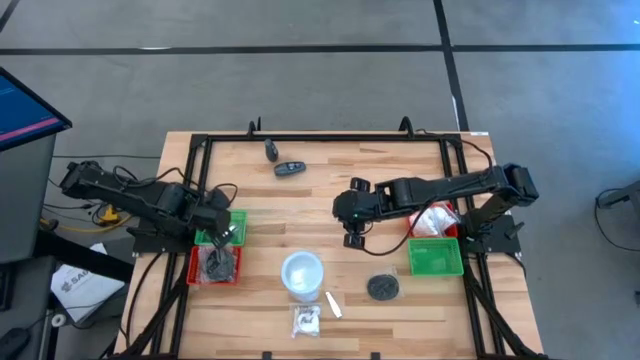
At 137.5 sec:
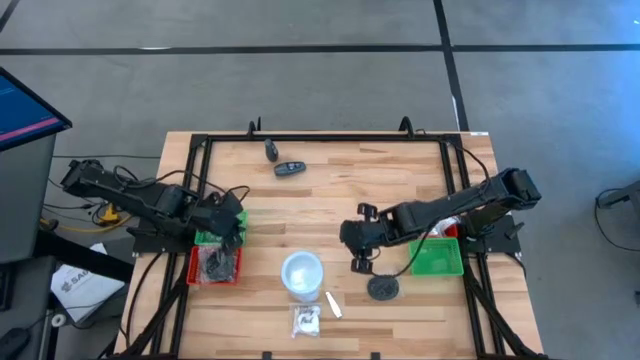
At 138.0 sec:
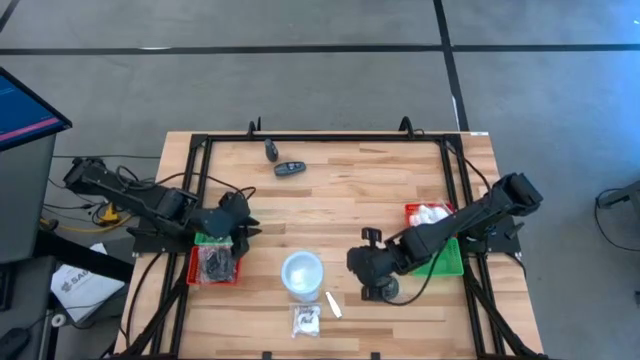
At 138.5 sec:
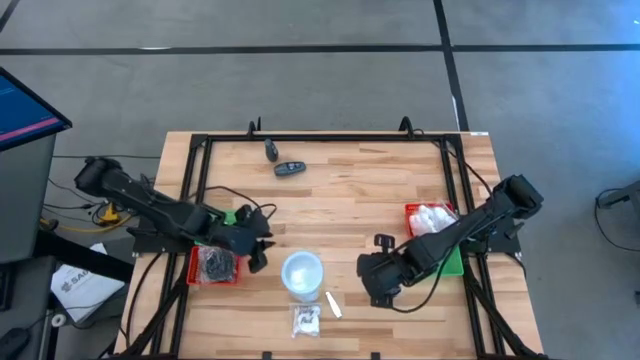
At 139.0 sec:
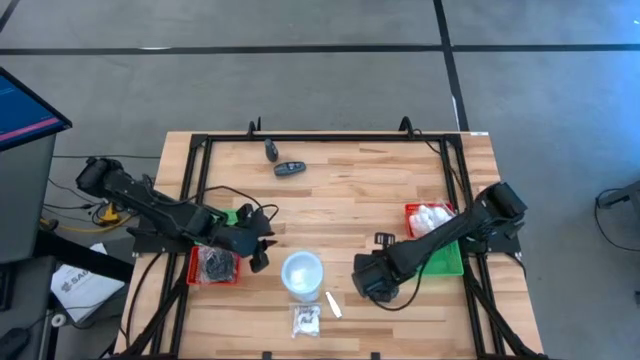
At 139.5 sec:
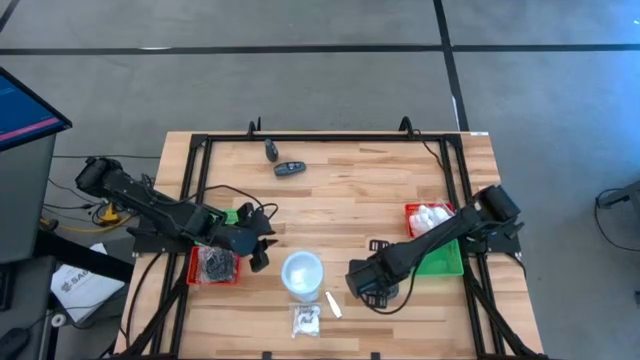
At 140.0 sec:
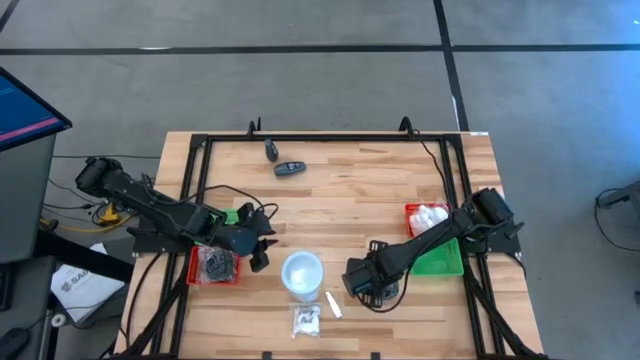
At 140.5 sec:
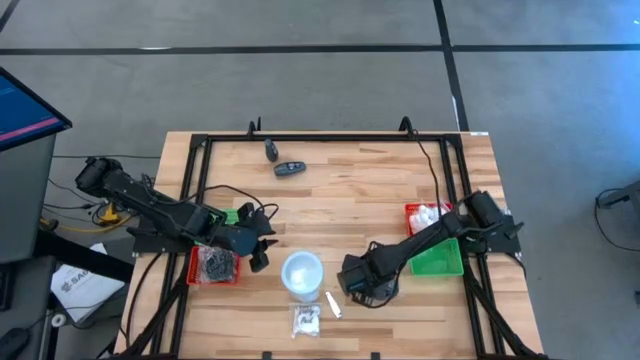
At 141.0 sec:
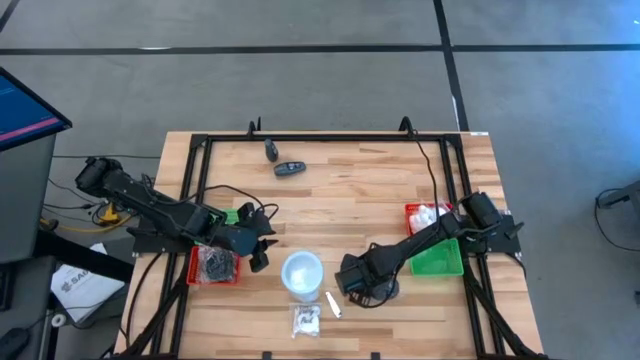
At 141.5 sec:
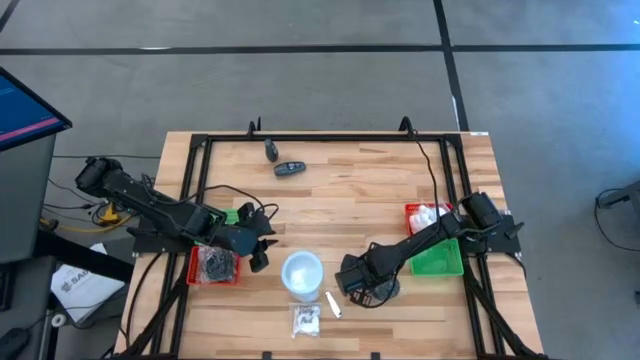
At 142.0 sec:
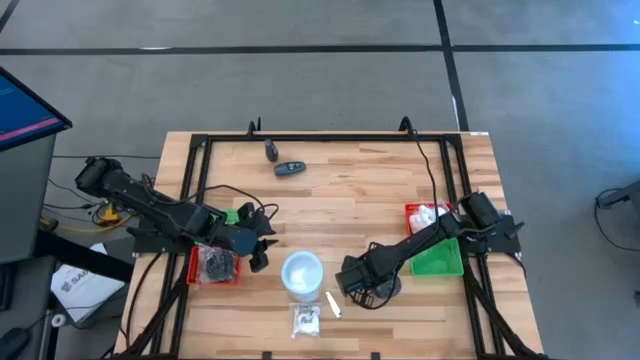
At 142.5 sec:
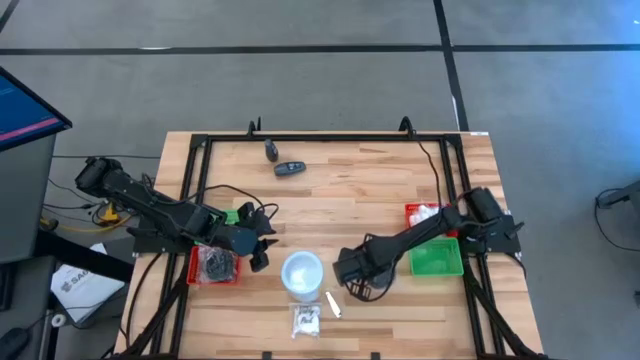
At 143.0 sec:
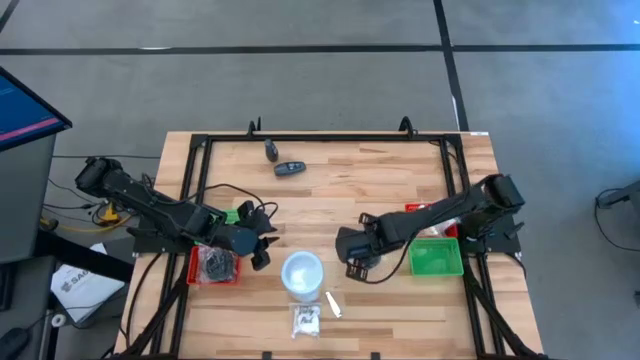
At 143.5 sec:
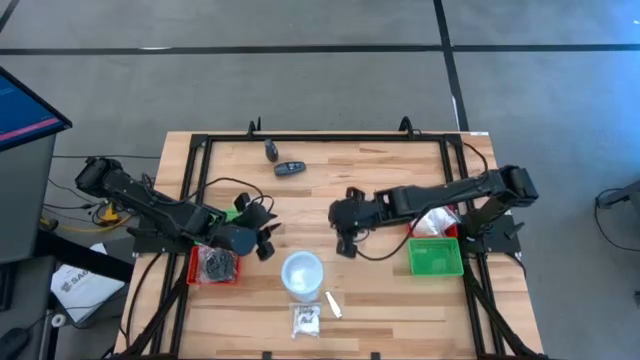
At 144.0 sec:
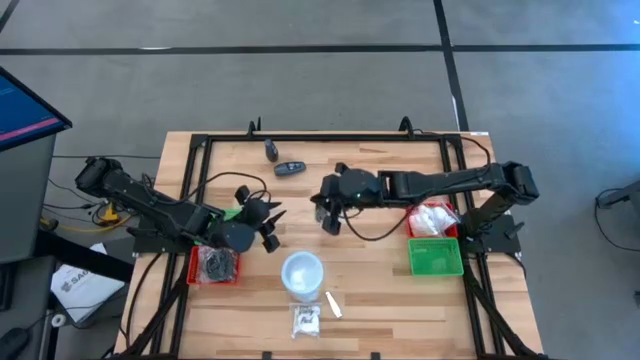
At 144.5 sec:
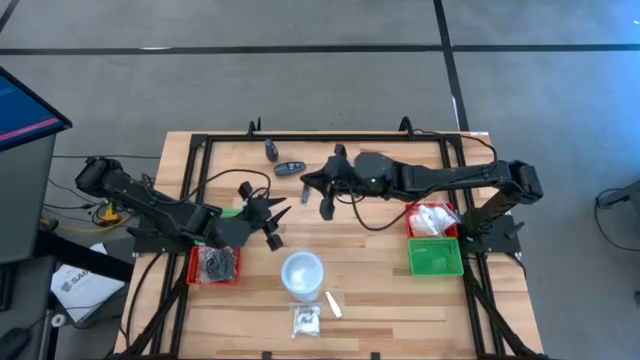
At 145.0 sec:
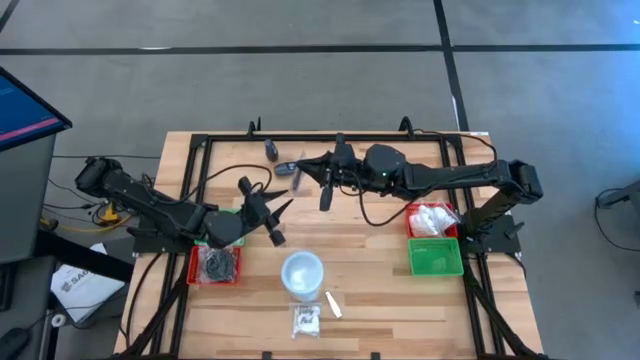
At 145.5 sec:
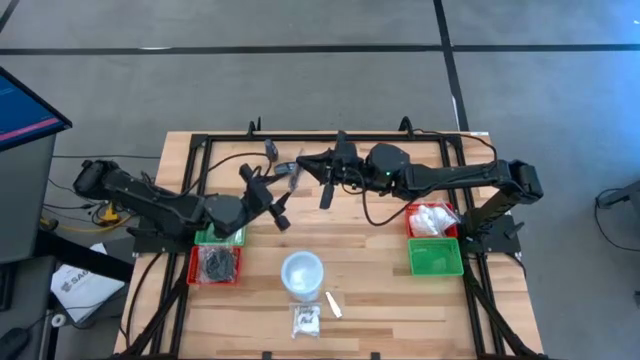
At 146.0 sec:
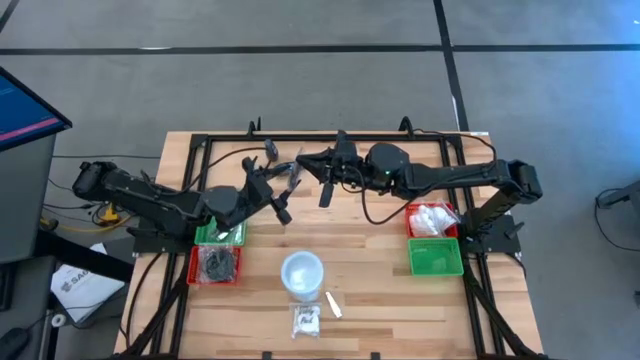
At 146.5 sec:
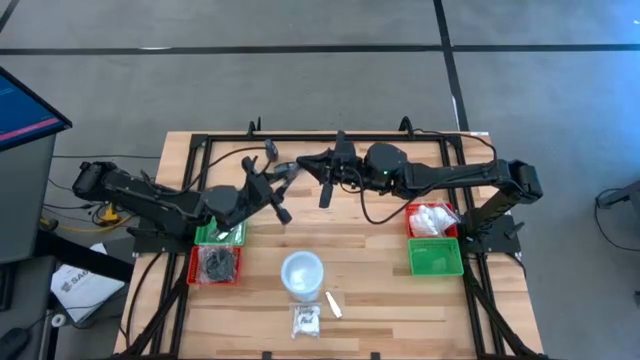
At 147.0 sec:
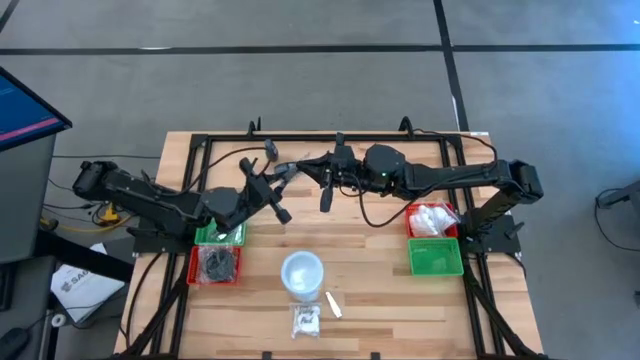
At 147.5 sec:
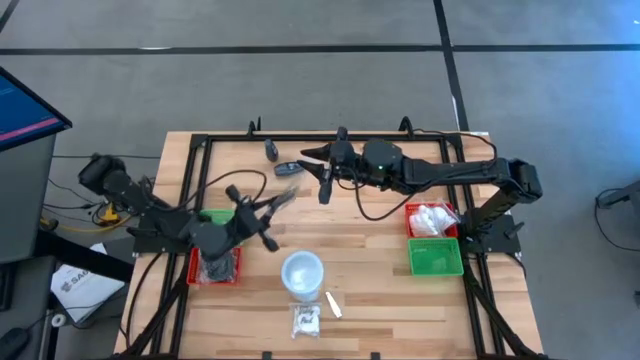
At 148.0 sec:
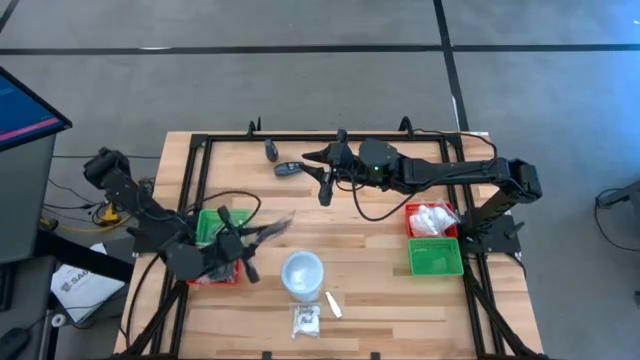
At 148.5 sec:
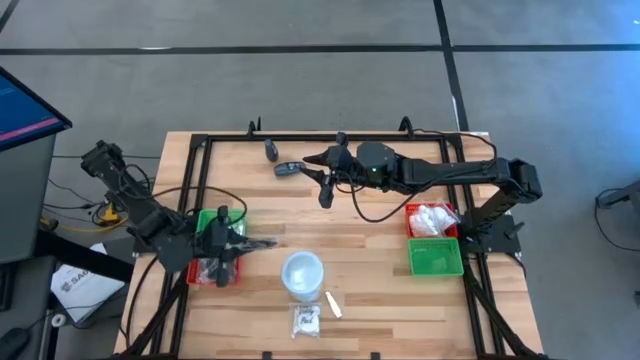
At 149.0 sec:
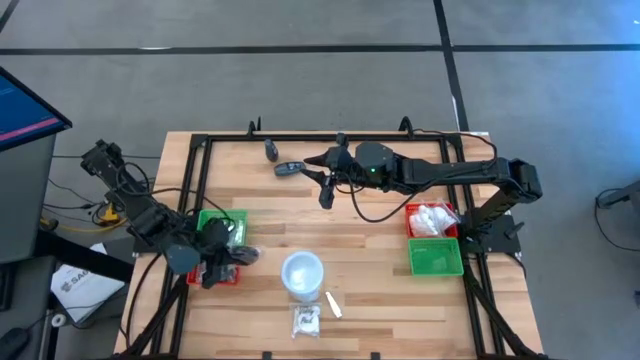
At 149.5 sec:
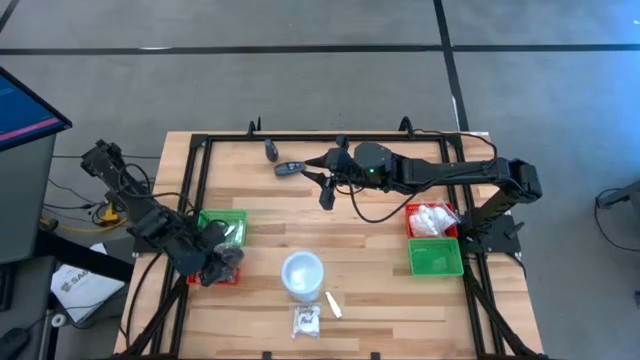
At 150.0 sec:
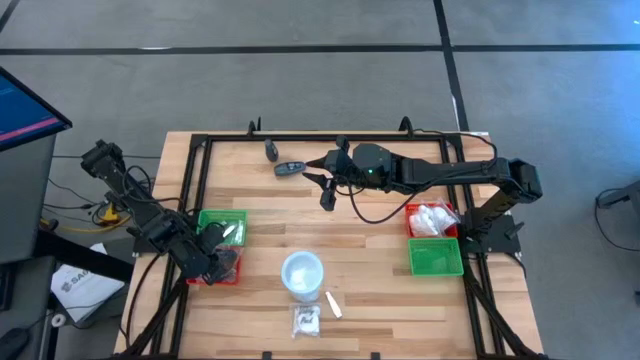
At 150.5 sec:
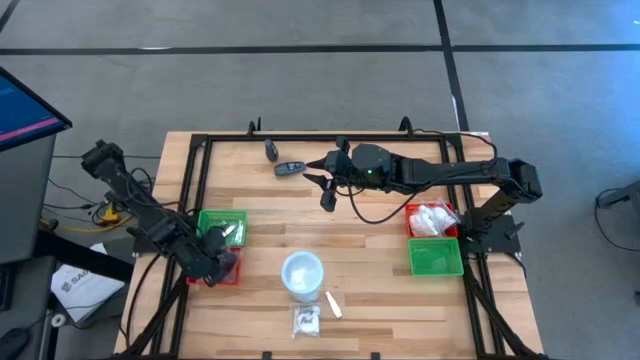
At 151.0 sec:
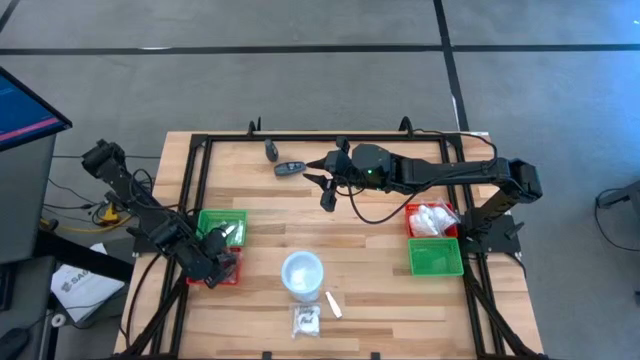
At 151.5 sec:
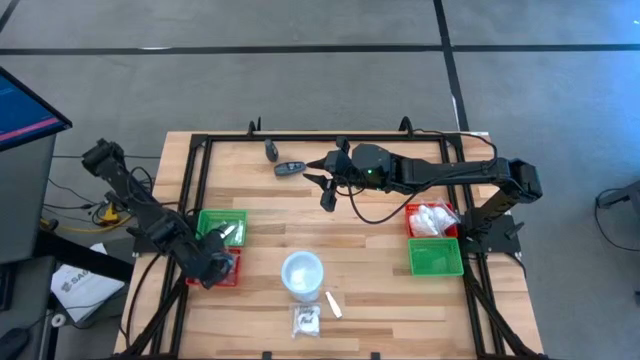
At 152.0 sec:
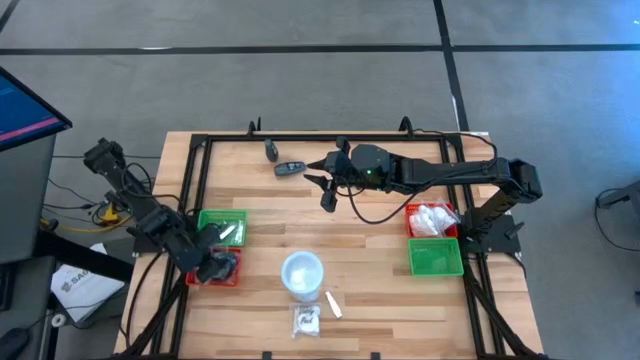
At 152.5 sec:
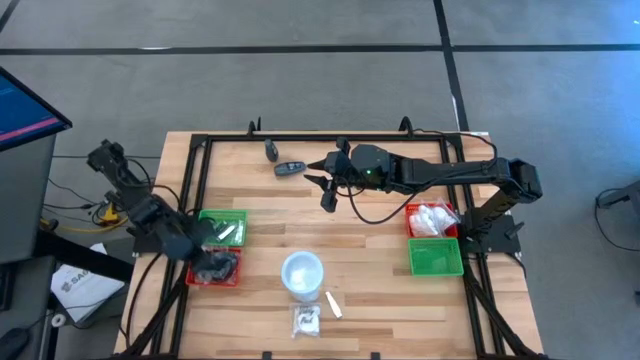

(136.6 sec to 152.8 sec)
Task: Pick & Place Travel size toiletries
Put the black hairbrush into the left red bin

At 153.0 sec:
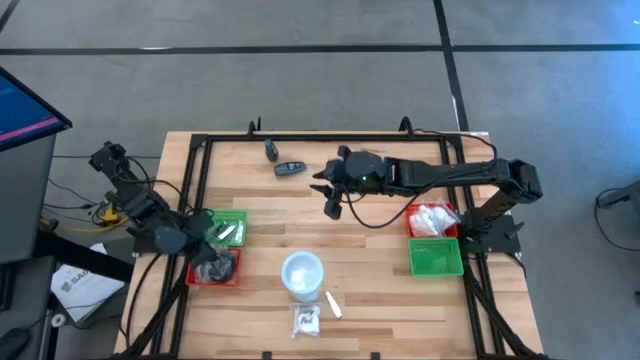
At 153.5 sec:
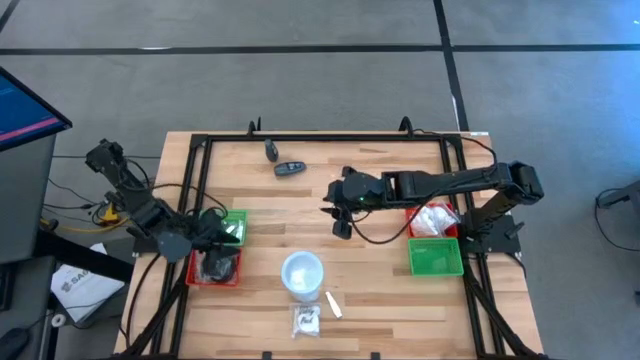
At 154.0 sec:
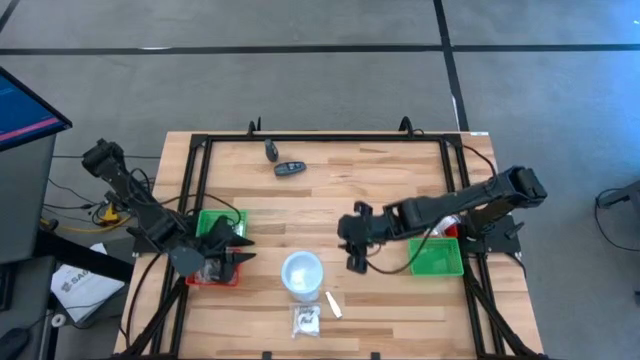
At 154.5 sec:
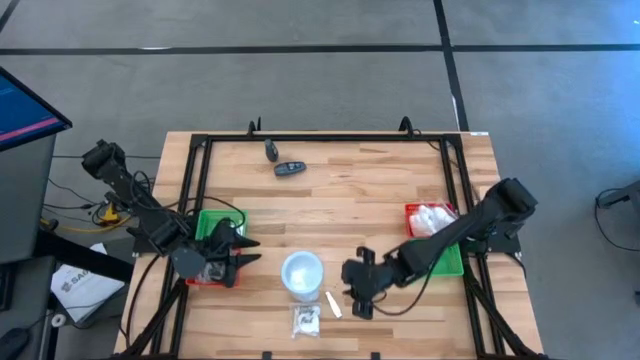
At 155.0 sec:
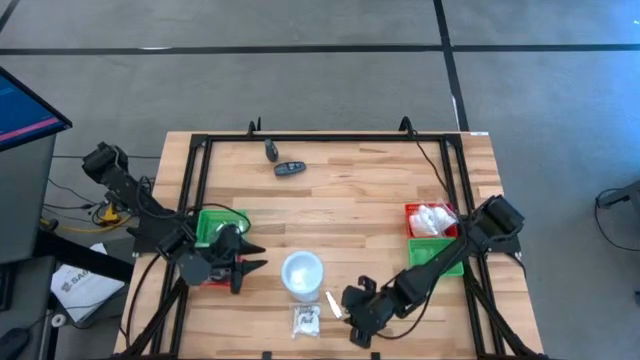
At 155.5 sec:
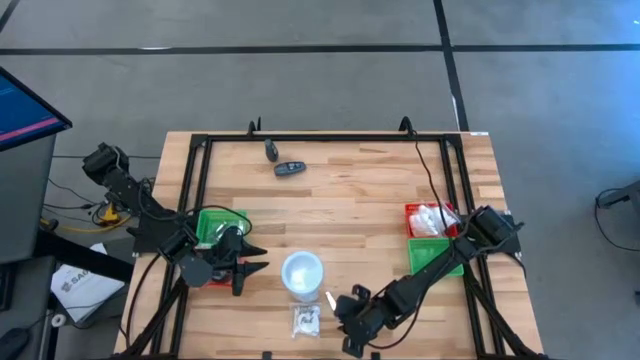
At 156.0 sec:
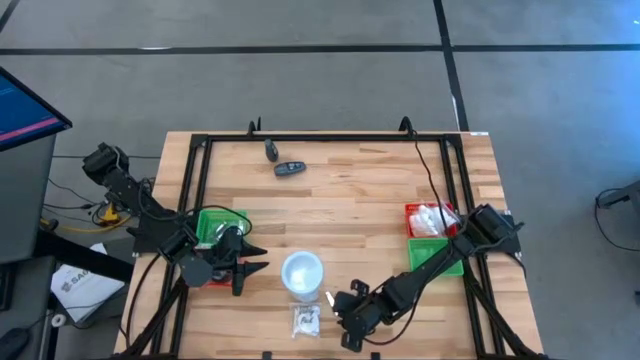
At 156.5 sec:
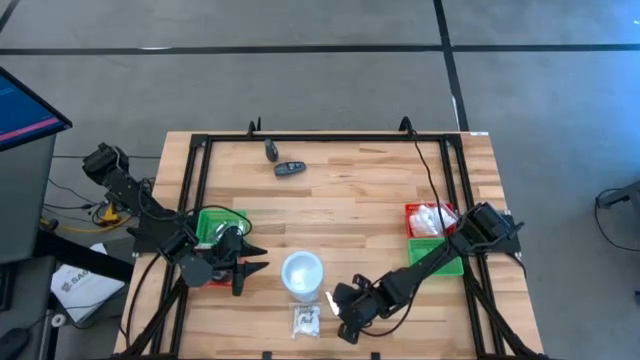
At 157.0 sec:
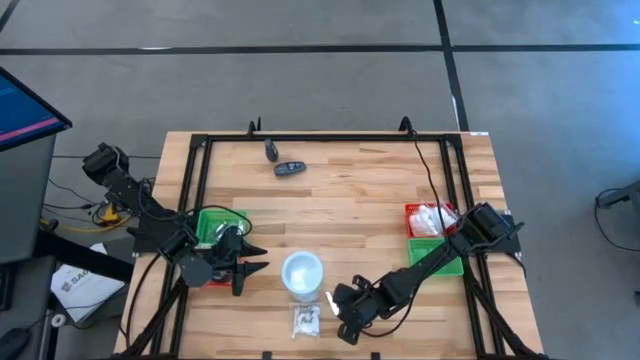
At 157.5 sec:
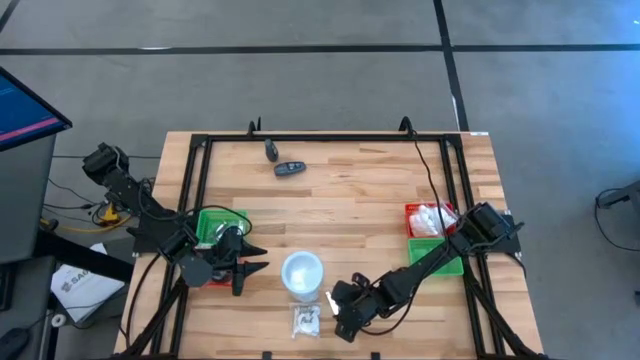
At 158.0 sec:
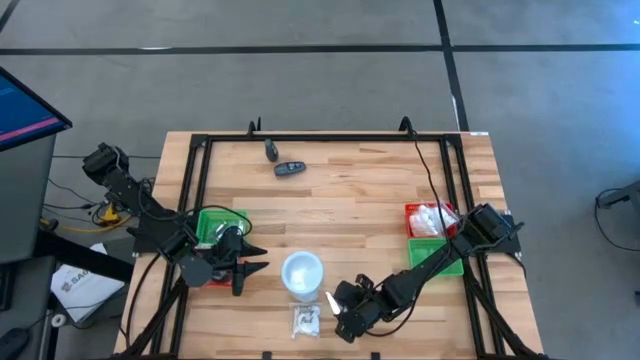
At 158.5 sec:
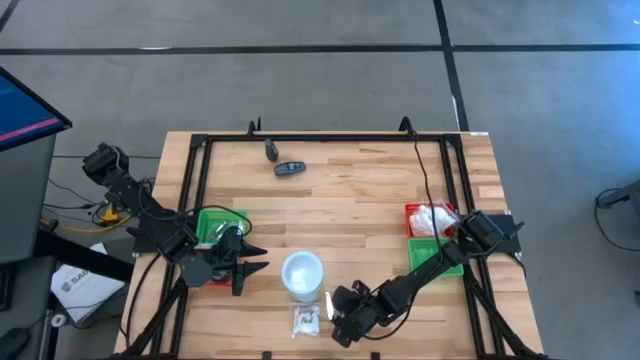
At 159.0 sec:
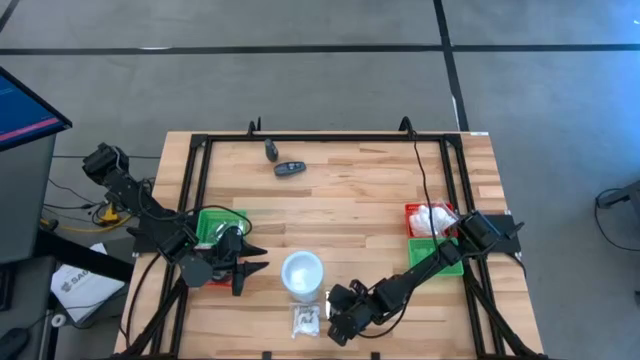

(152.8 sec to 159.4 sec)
Put the silver nail cutter into the left green bin
